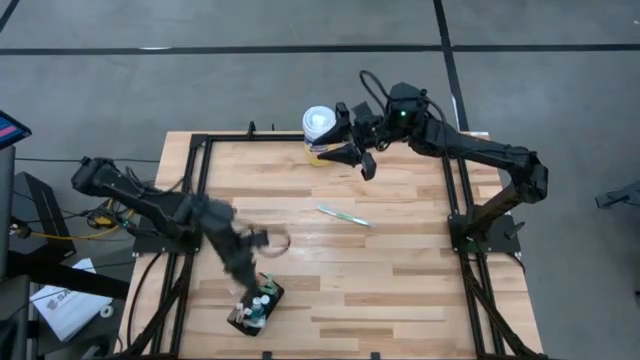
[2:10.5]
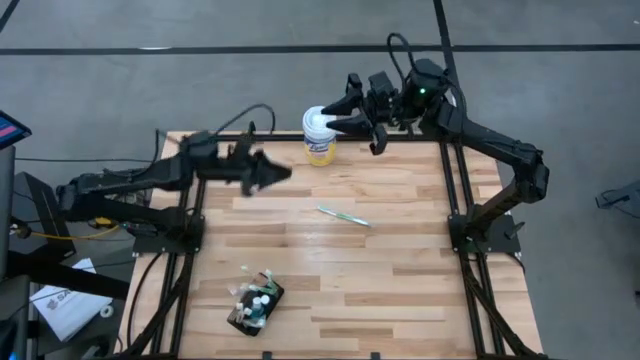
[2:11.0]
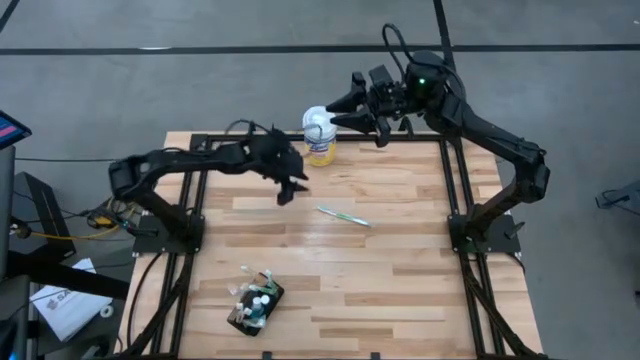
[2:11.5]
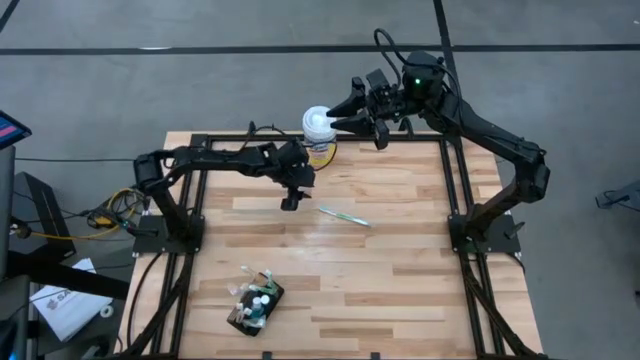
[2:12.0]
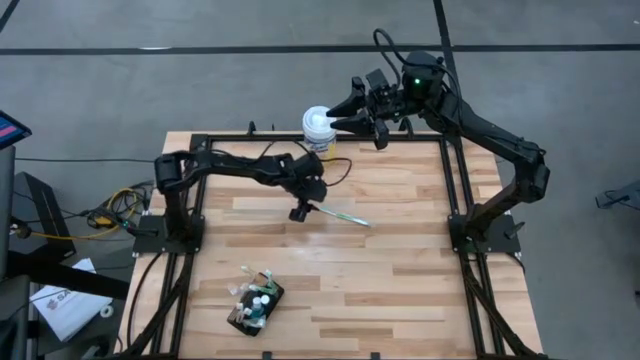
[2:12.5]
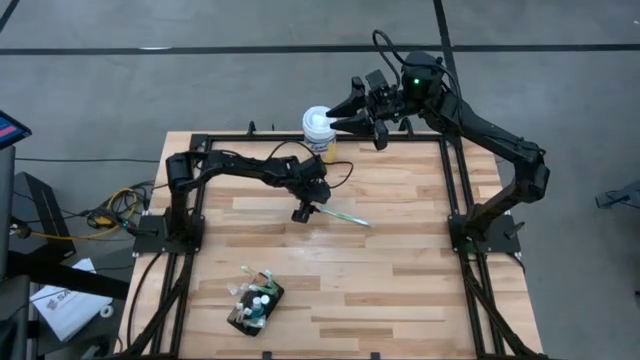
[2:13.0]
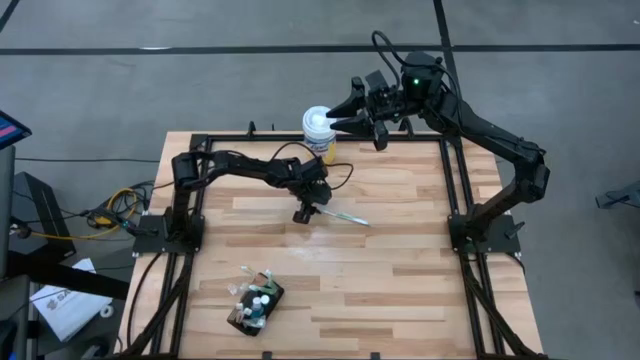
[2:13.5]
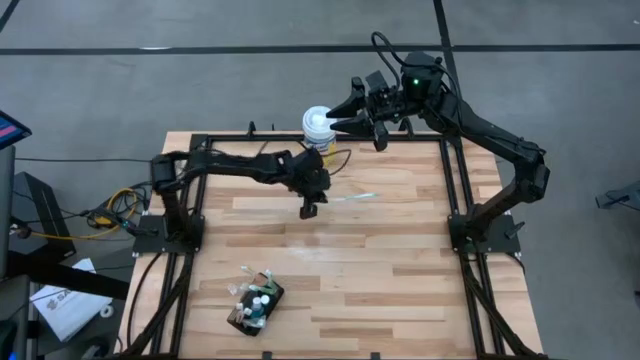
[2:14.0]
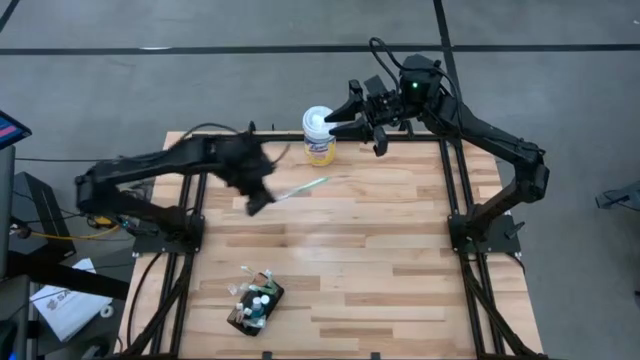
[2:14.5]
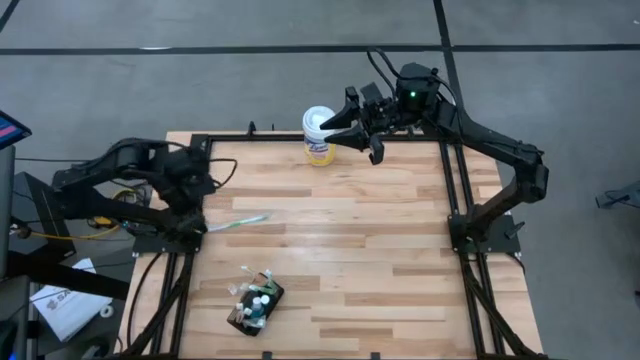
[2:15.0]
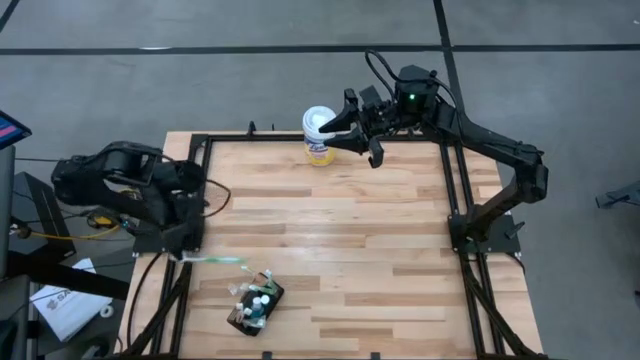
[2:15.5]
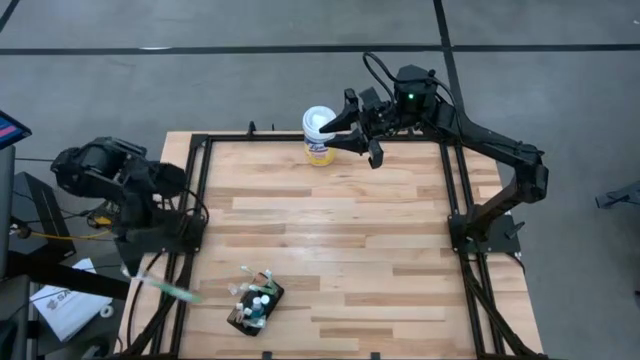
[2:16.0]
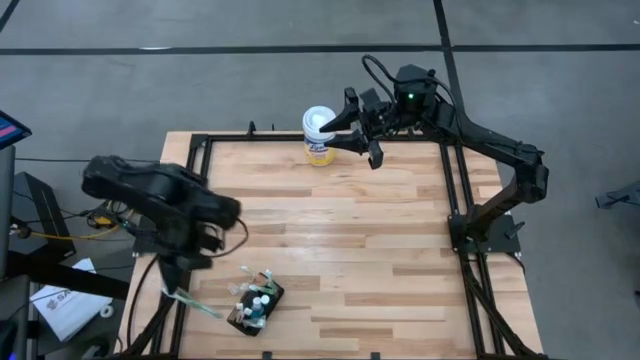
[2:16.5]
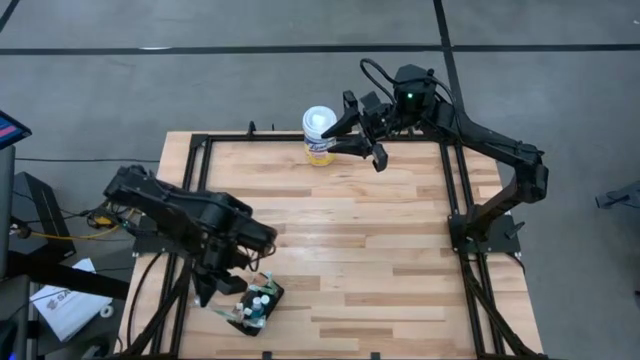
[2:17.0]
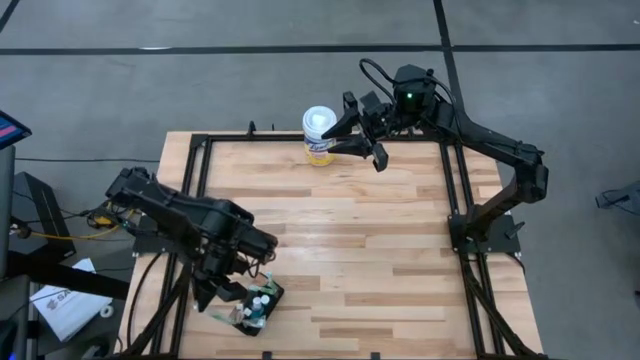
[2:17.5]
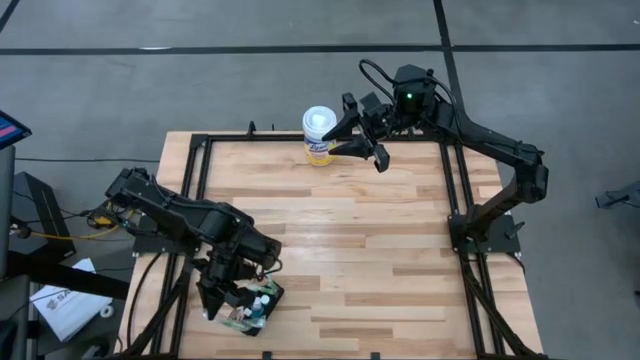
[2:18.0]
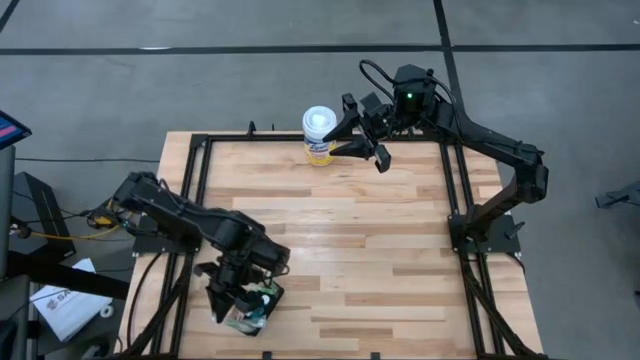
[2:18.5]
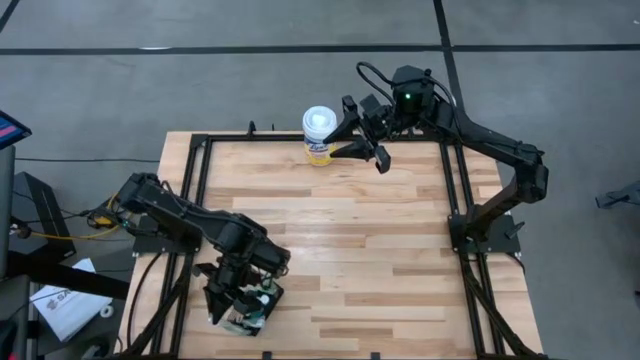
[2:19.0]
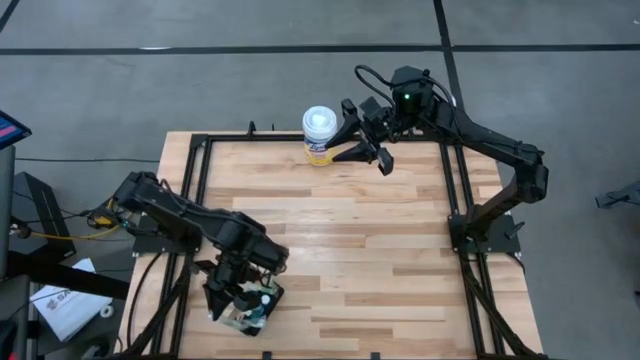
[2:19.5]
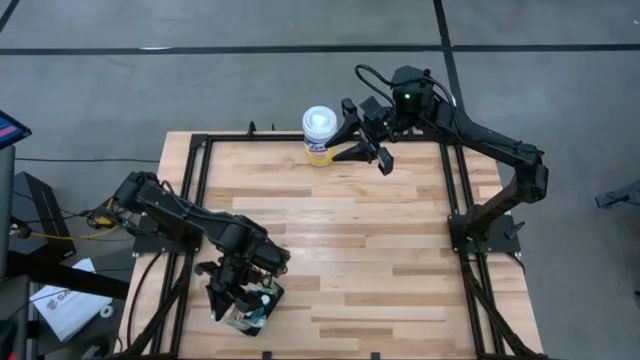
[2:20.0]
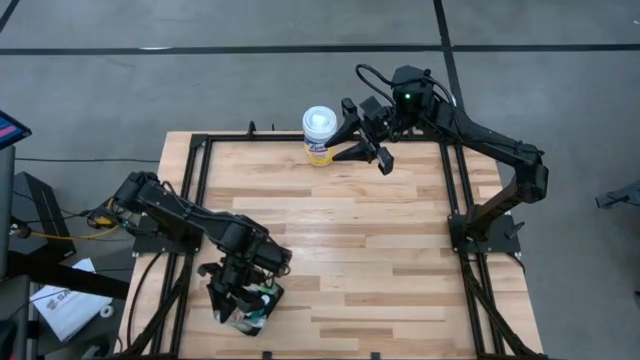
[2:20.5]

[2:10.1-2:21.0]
Task: Pick & Place toothbrushing station
Put the green toothbrush into the black wire organizer bin

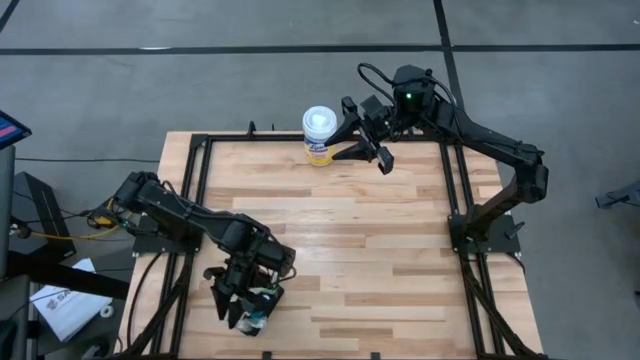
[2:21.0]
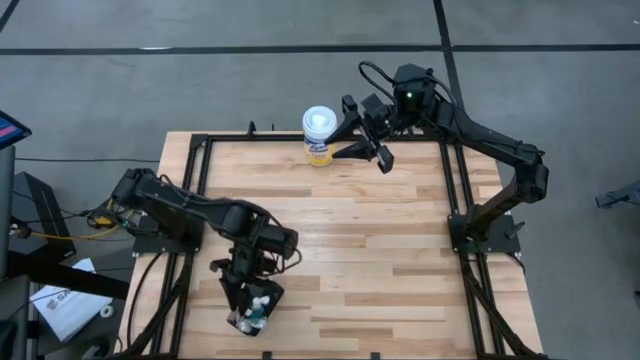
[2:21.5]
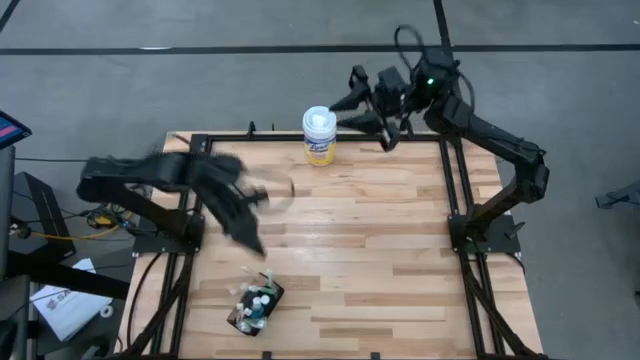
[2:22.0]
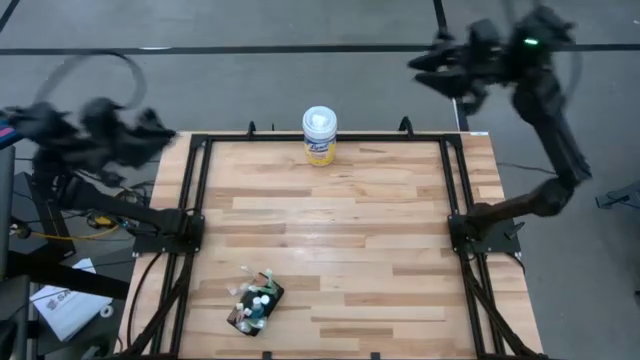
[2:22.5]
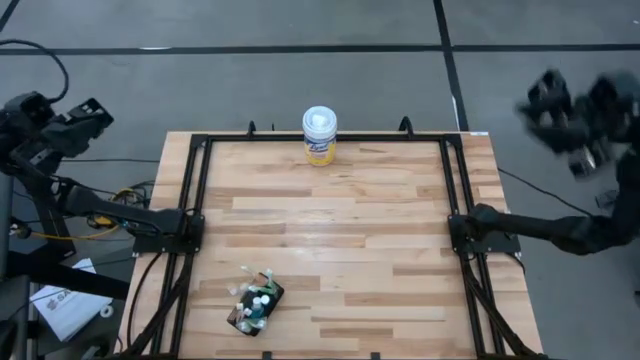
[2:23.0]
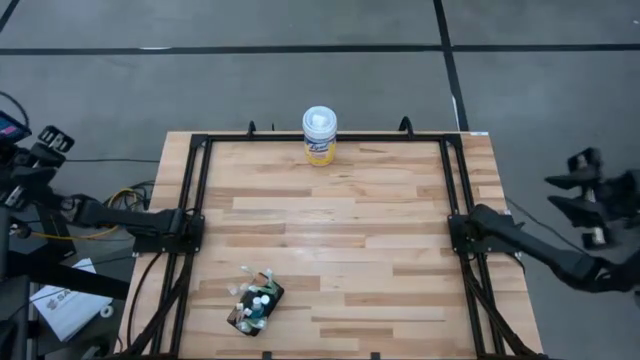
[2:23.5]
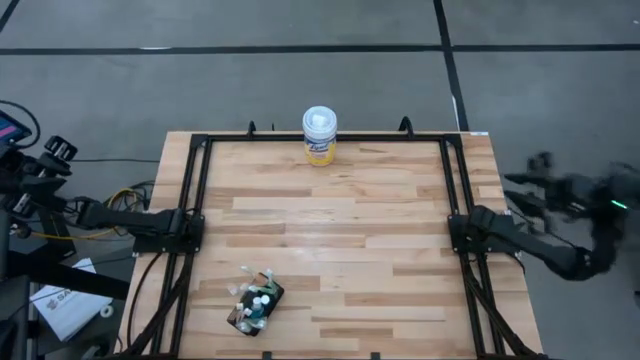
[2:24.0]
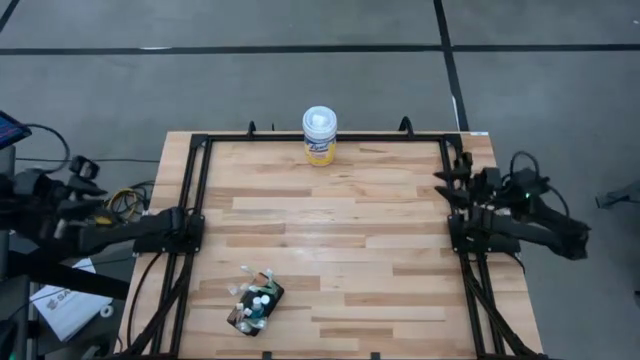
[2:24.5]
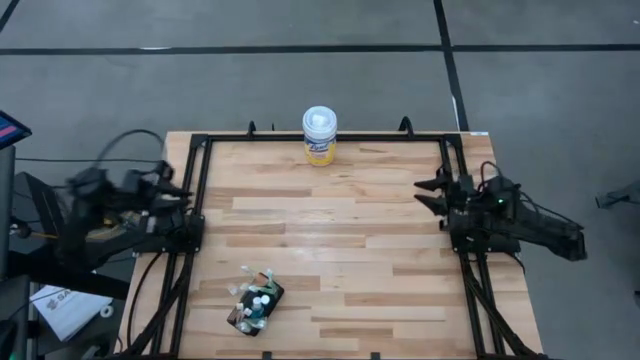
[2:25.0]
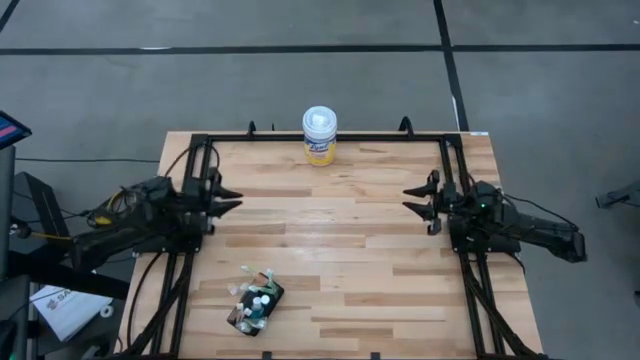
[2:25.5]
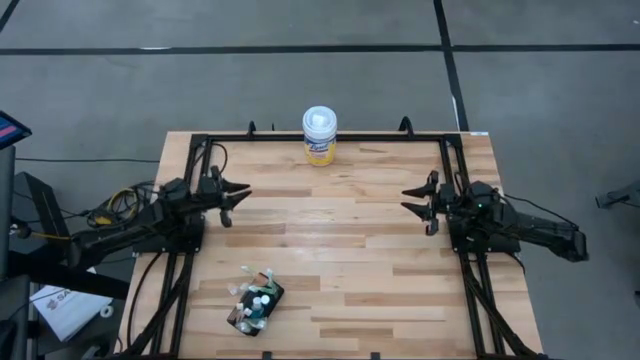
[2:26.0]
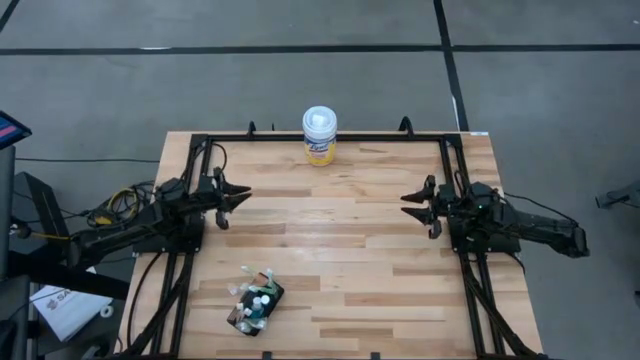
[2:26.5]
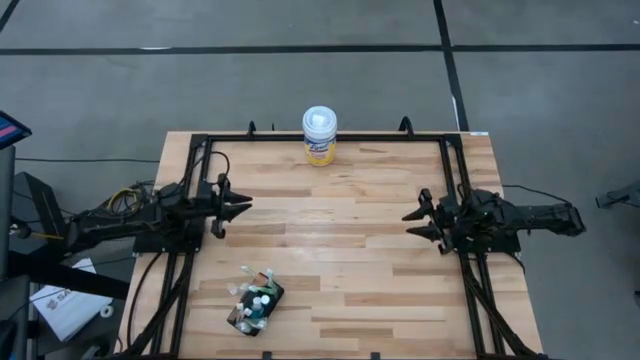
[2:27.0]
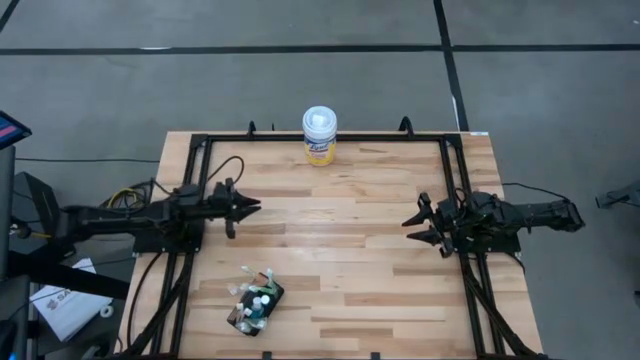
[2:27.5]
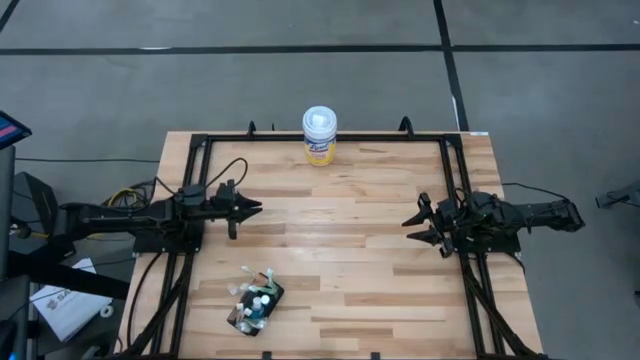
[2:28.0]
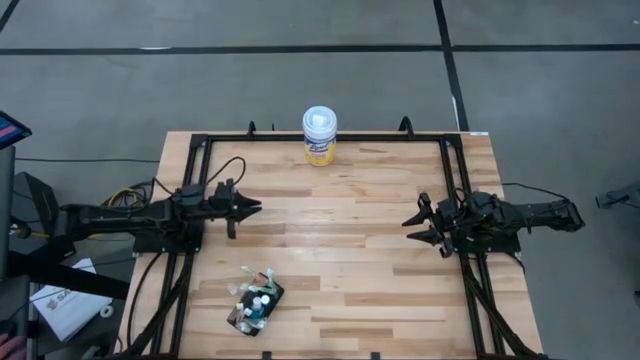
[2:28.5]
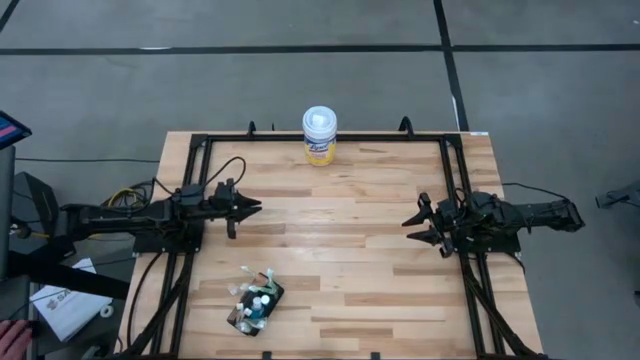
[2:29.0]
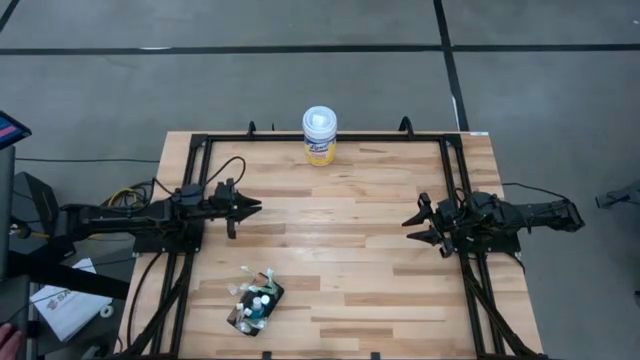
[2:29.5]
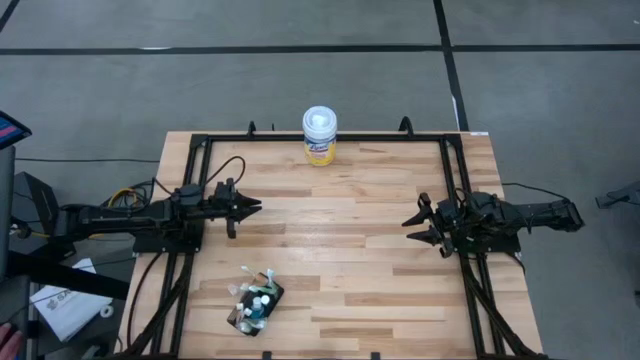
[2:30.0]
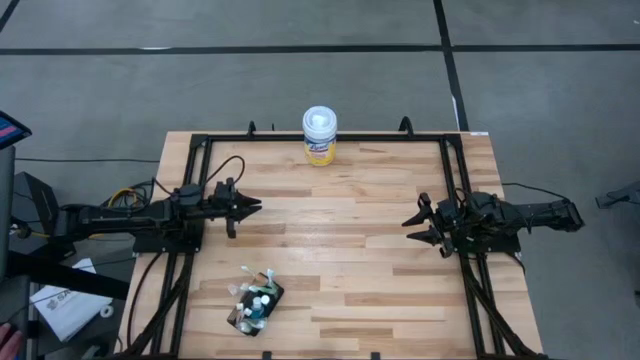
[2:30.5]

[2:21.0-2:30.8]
Return to Home Position

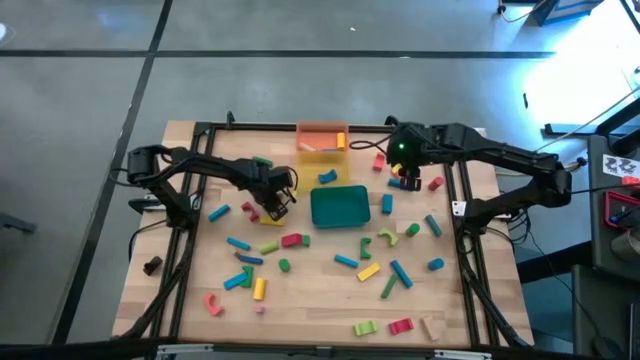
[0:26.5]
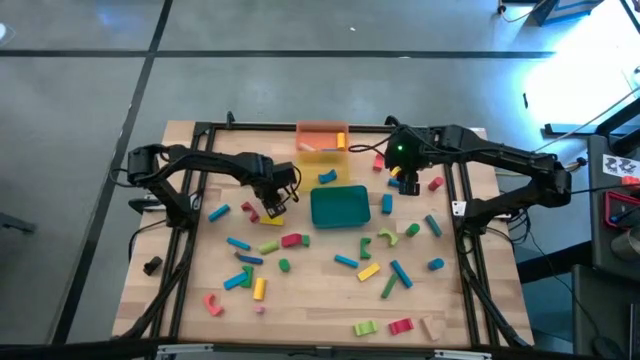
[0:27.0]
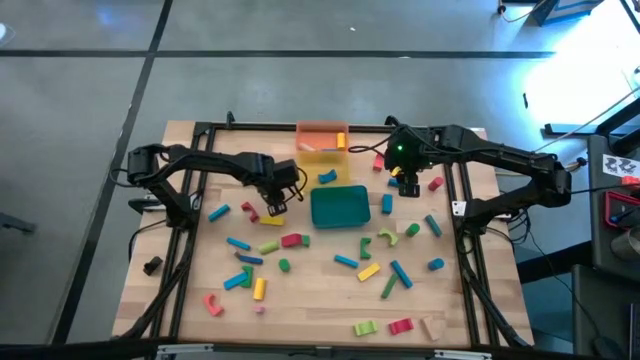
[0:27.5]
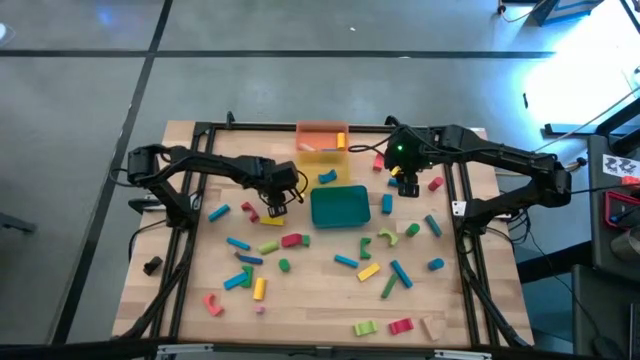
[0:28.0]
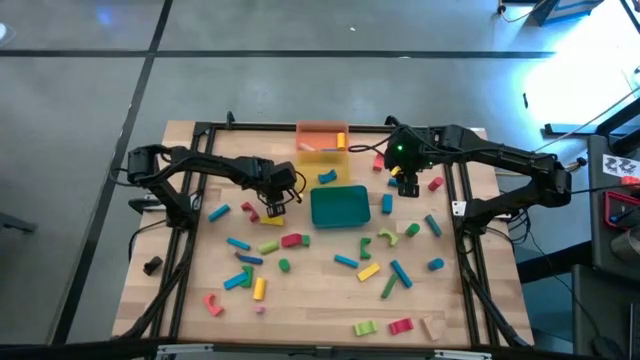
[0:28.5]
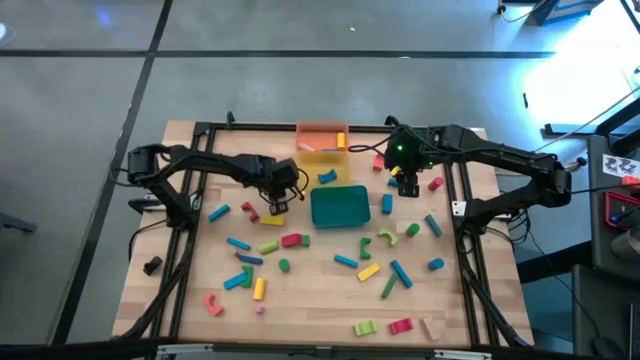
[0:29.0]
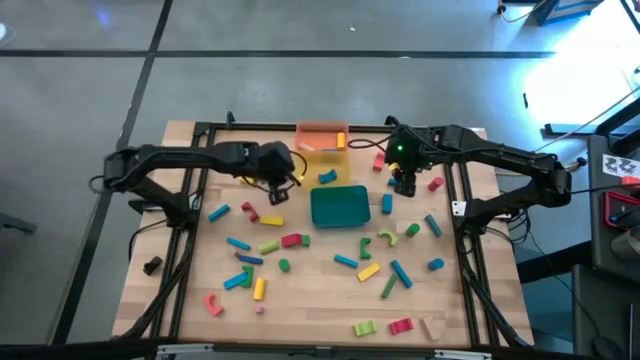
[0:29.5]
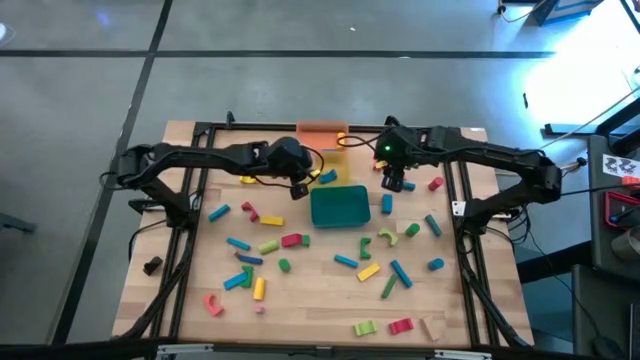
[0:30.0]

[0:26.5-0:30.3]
Task: Sort blocks by size
Put the brown arch block into the yellow bin
